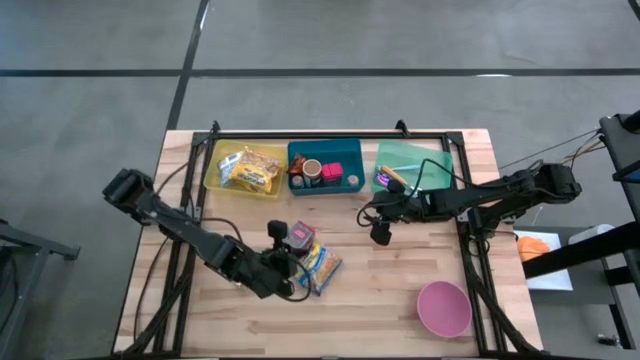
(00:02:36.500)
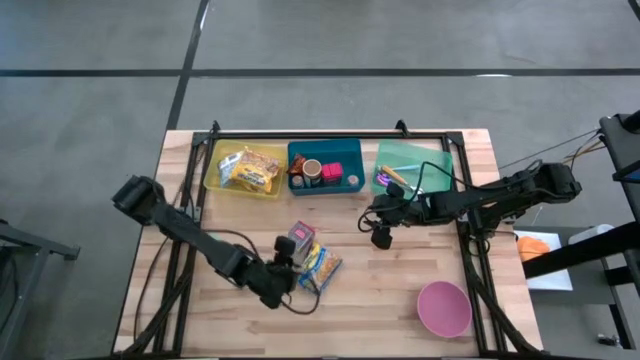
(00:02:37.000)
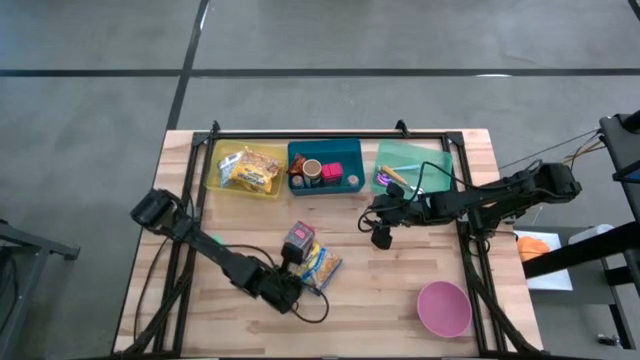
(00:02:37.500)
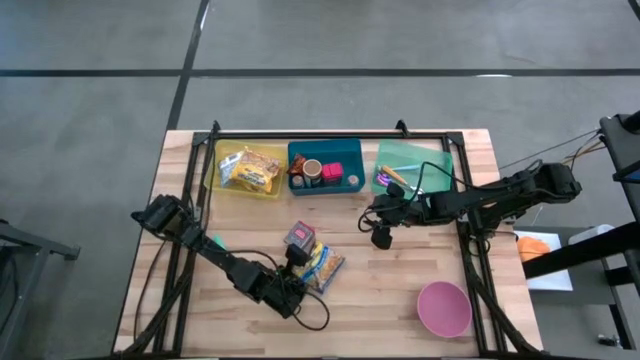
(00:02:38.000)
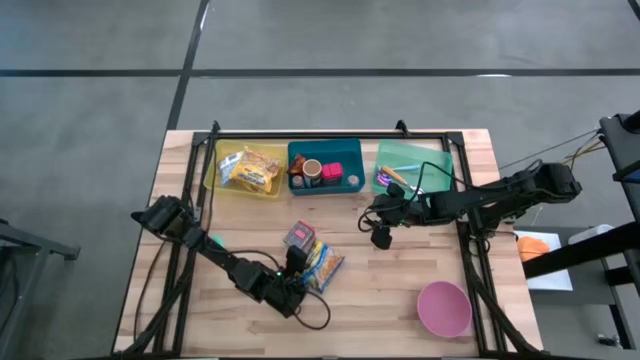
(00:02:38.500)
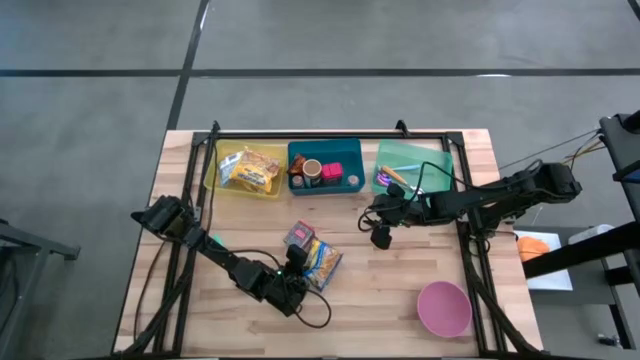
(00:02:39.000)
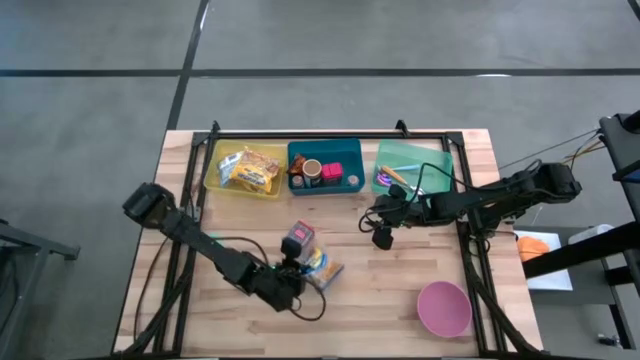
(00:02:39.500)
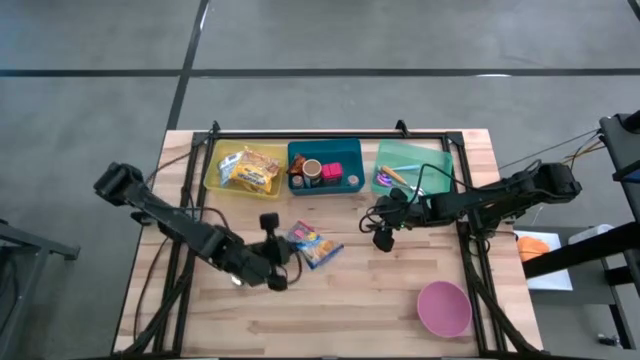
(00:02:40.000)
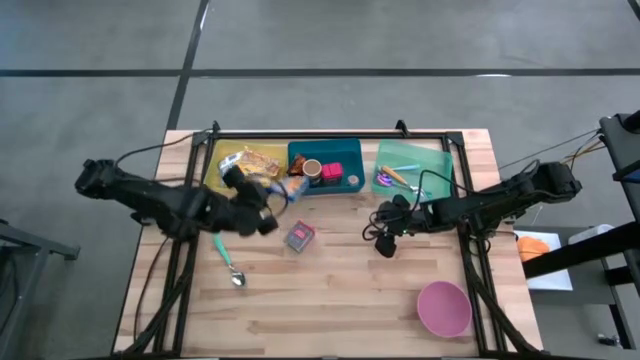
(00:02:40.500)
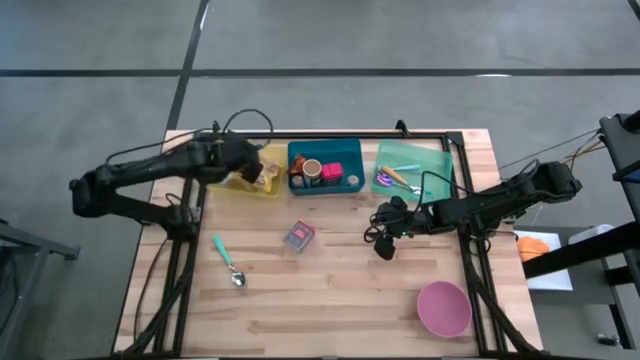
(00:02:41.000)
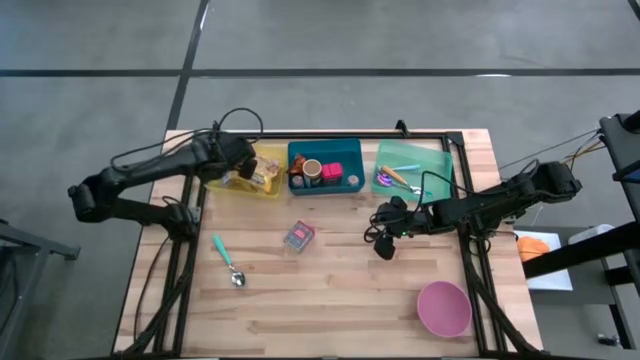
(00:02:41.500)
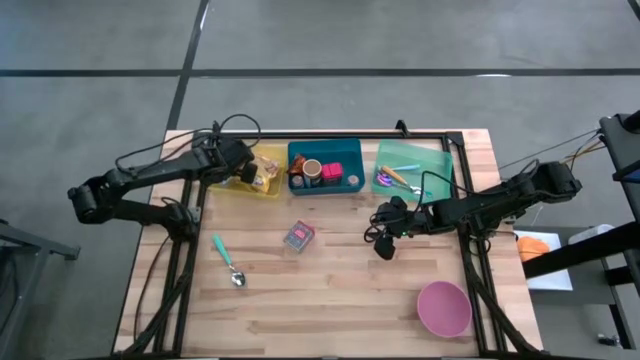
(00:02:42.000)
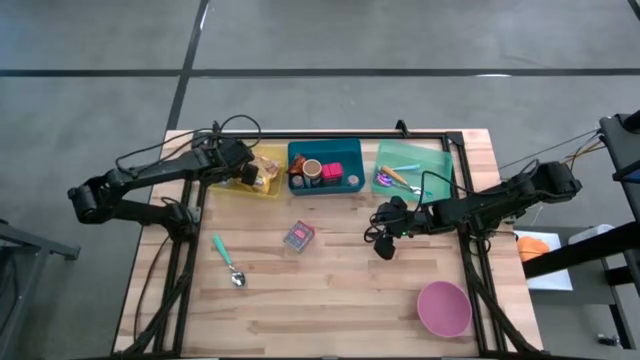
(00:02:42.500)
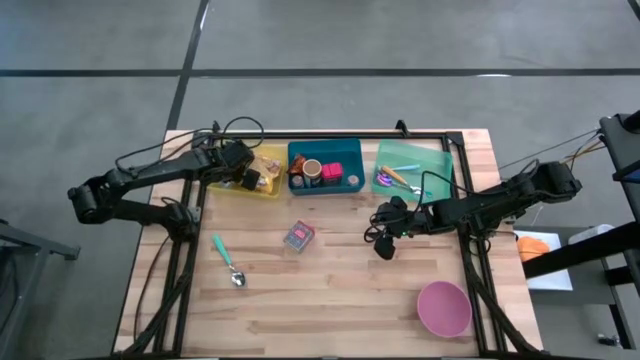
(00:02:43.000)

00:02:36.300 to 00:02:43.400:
Put the blue noodle pack into the yellow bin

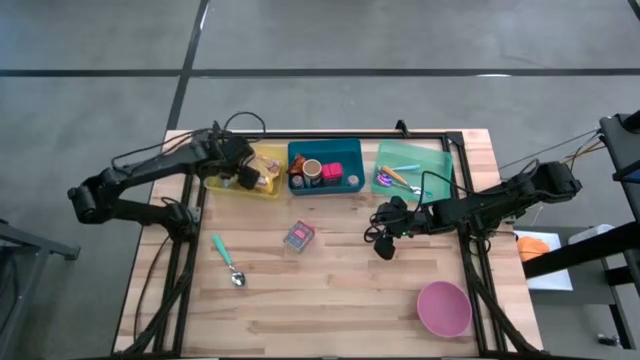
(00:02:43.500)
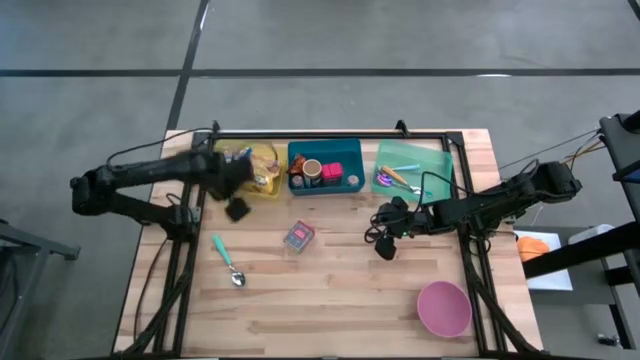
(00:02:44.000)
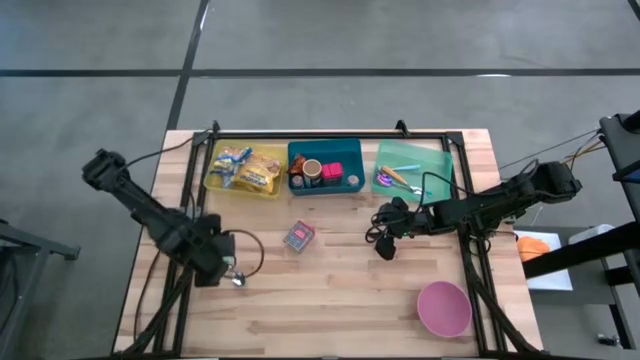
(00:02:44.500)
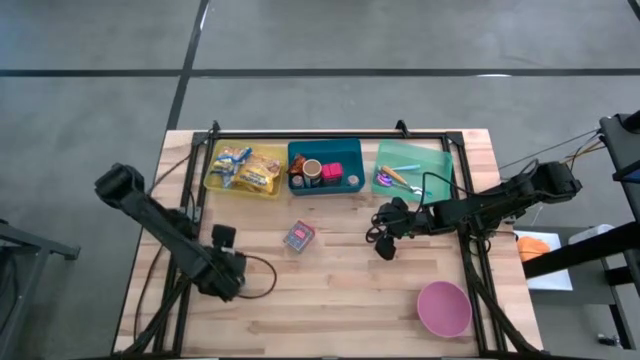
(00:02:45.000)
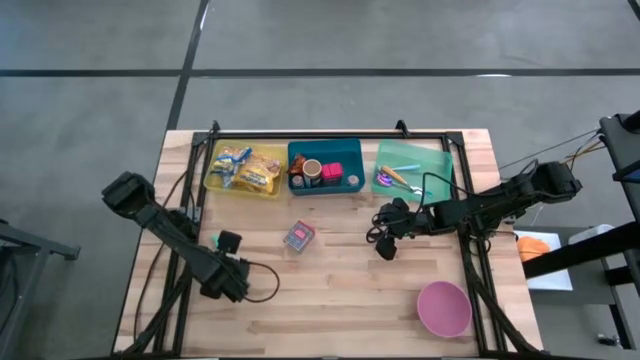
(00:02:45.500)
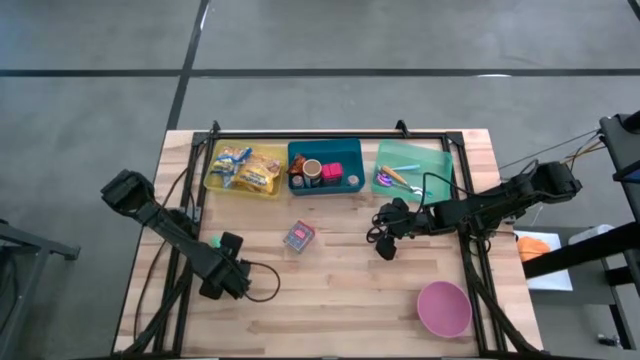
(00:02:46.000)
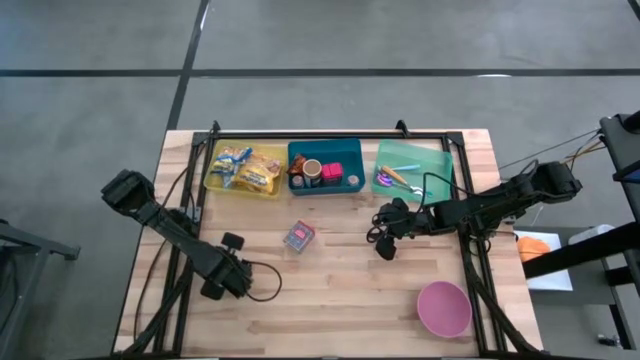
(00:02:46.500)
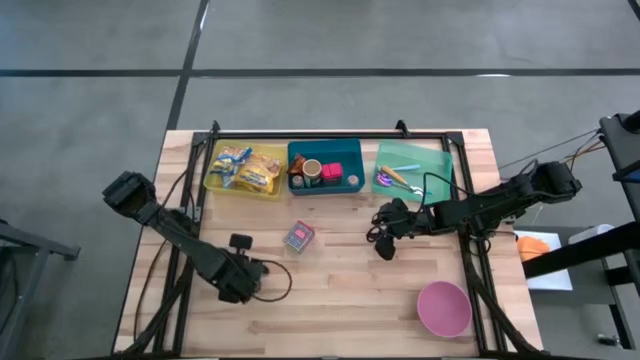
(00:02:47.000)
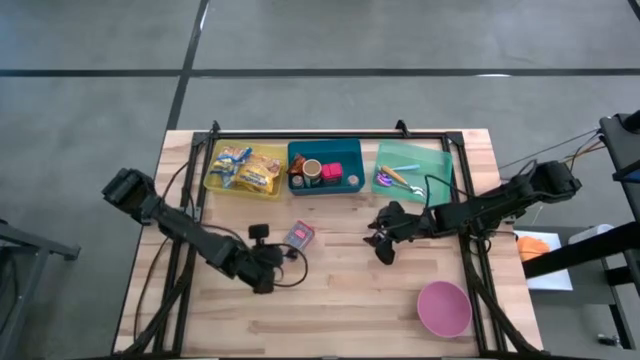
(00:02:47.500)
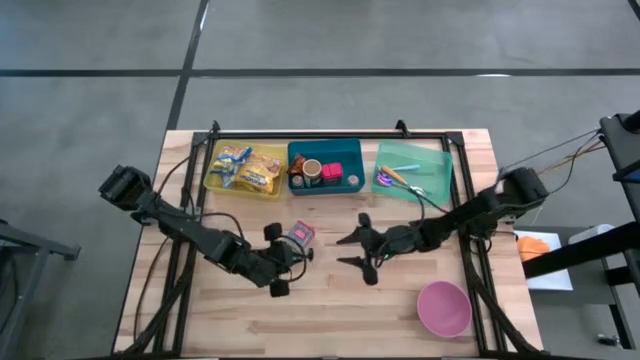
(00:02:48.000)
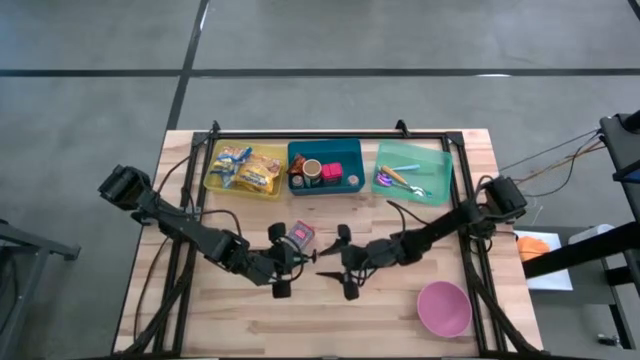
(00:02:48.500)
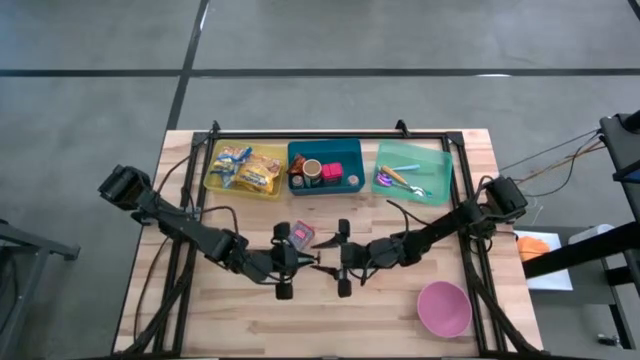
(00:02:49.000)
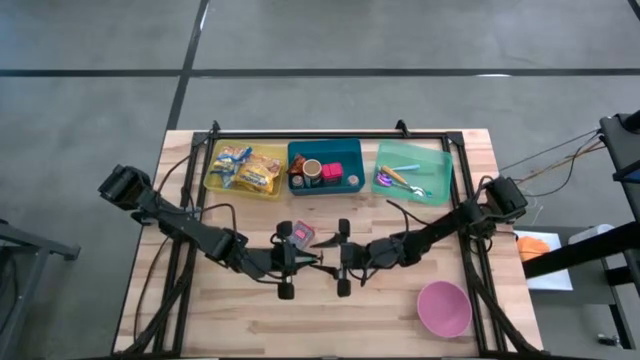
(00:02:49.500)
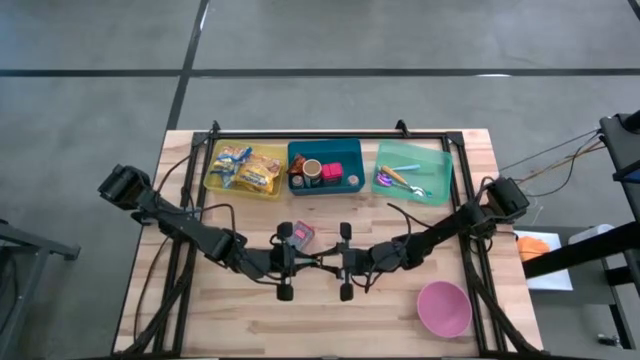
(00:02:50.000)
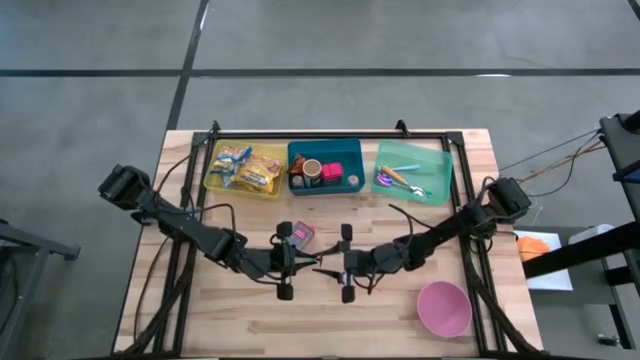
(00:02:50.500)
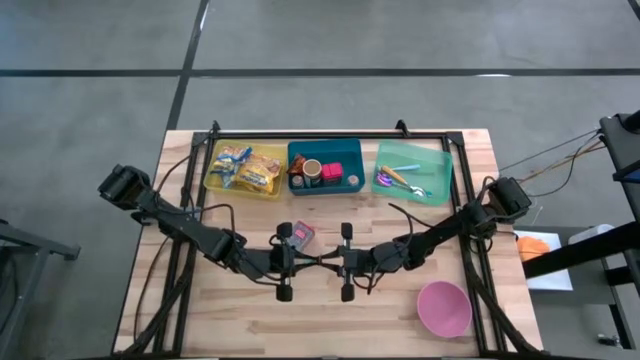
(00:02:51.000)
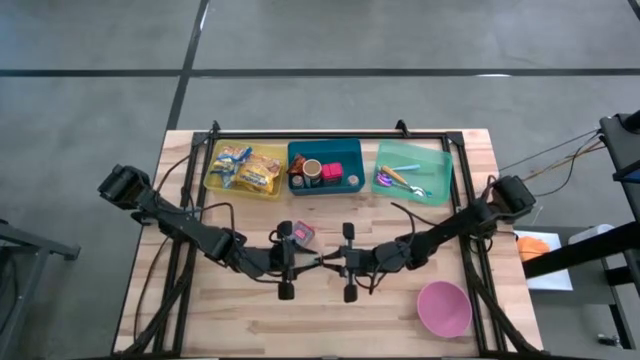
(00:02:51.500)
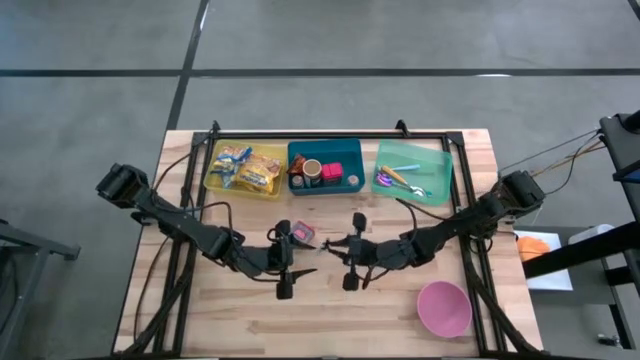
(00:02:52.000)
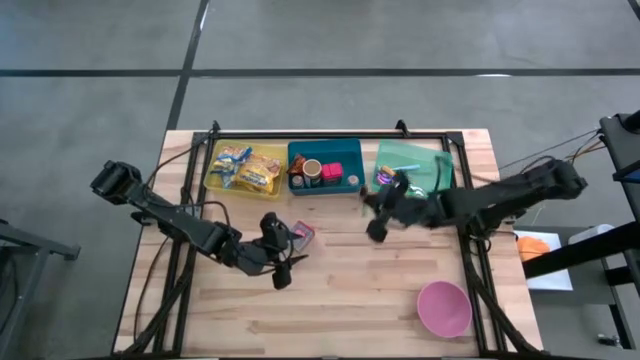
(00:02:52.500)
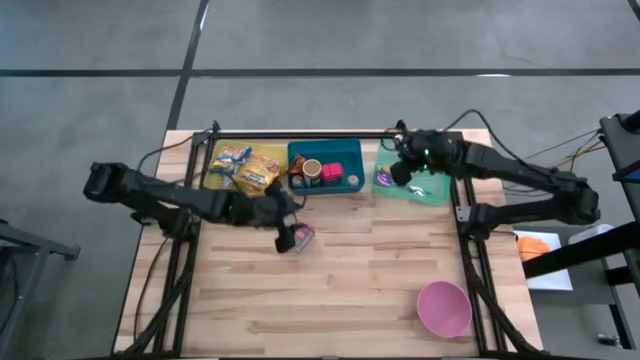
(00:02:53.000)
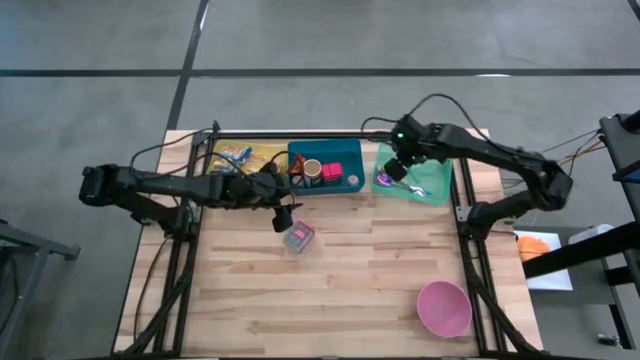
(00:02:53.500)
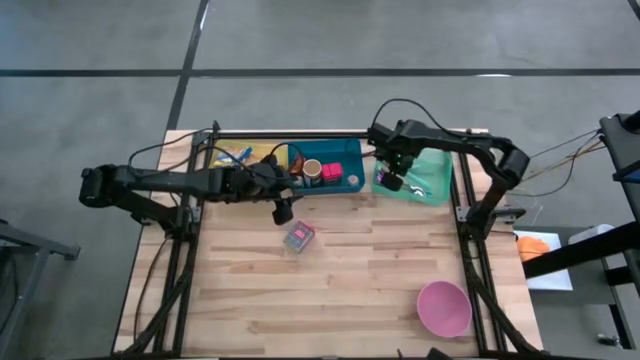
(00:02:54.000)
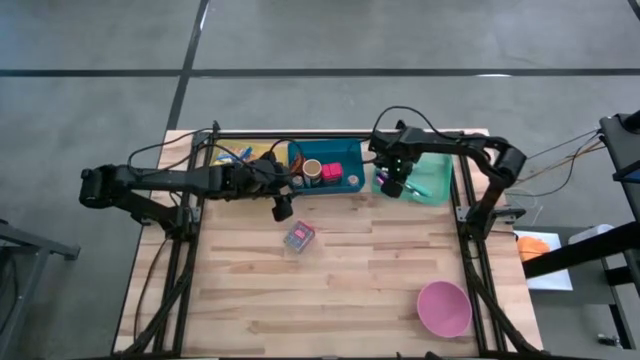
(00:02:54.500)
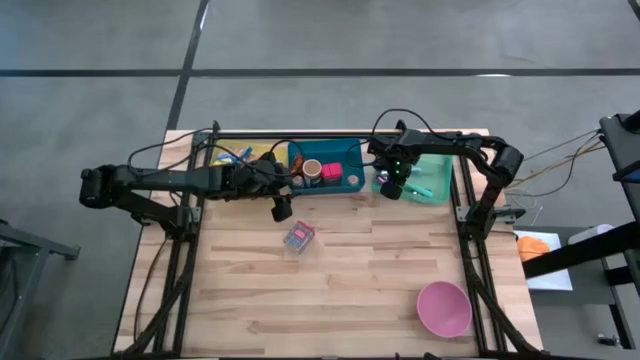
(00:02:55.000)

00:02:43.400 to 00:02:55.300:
Put the light green spoon into the green bin
